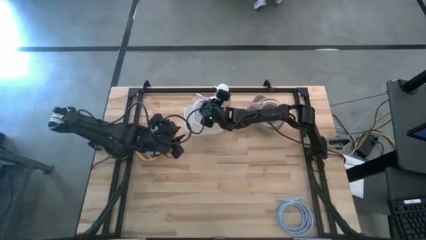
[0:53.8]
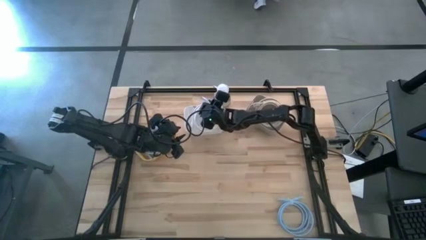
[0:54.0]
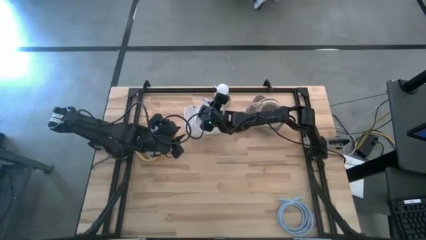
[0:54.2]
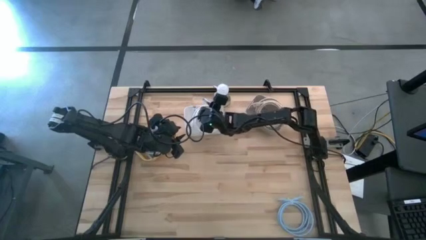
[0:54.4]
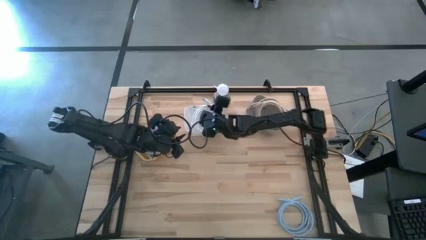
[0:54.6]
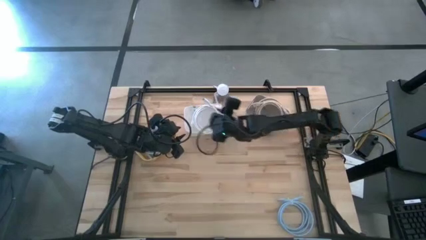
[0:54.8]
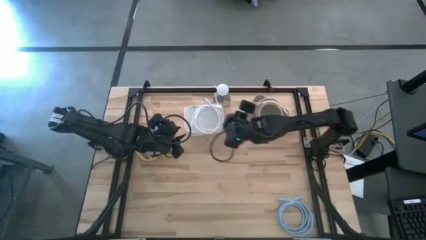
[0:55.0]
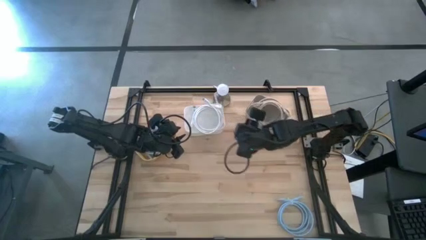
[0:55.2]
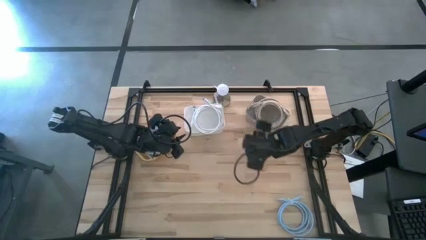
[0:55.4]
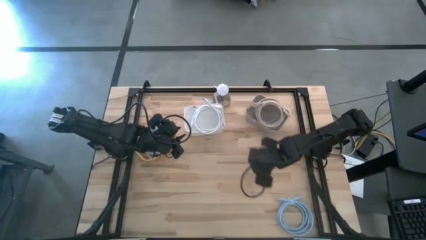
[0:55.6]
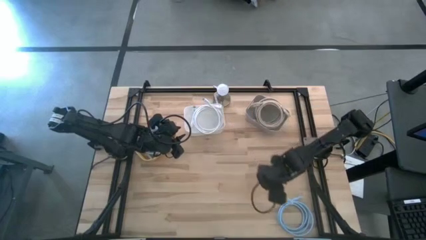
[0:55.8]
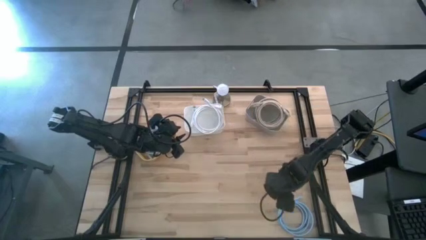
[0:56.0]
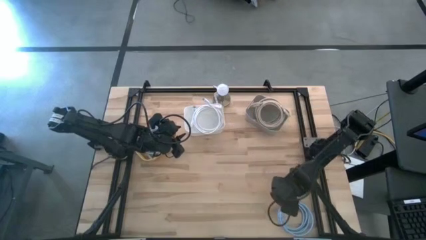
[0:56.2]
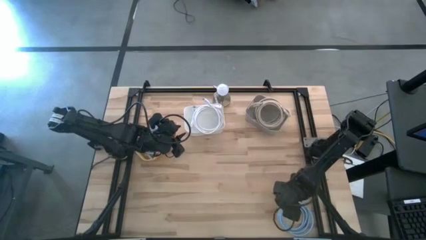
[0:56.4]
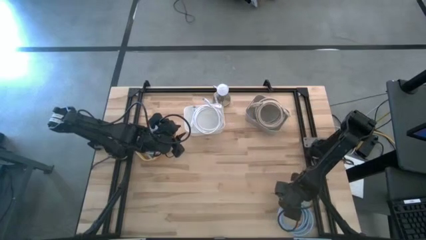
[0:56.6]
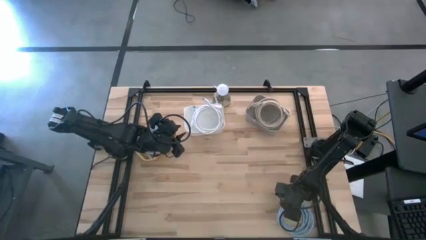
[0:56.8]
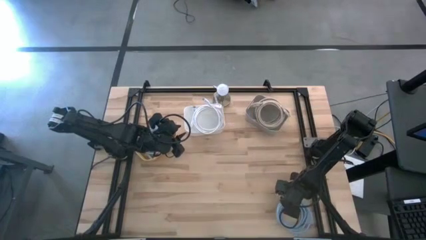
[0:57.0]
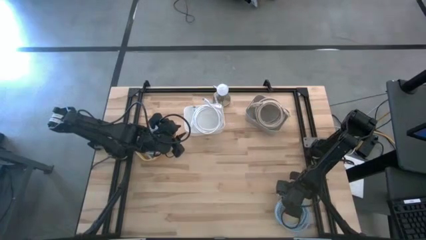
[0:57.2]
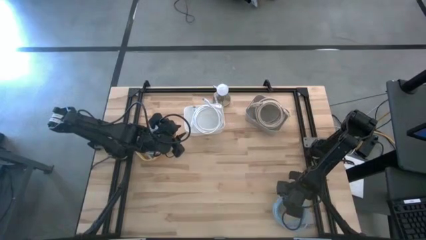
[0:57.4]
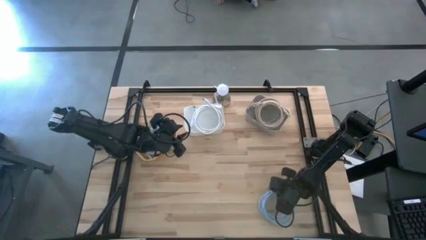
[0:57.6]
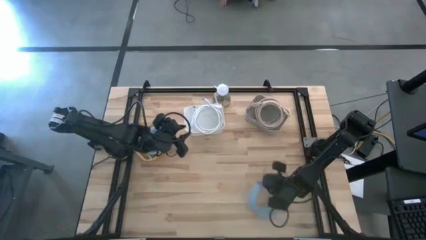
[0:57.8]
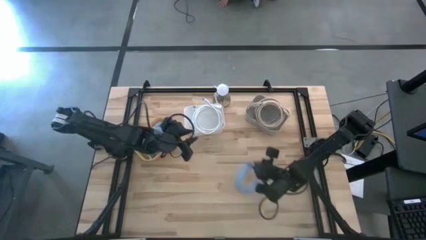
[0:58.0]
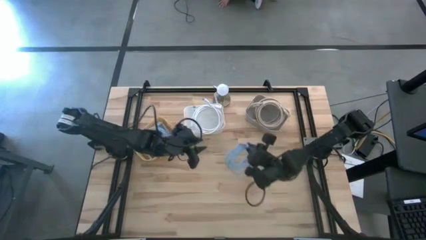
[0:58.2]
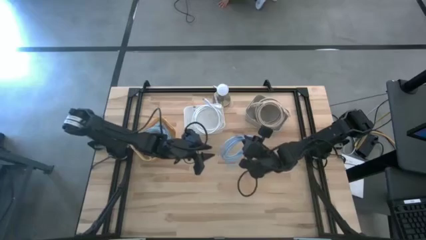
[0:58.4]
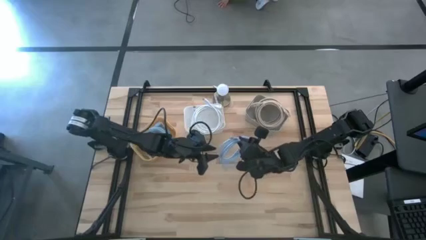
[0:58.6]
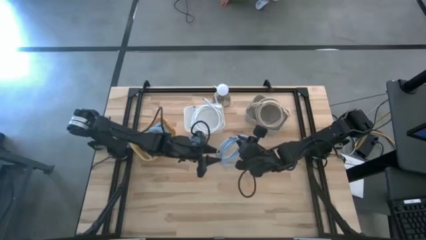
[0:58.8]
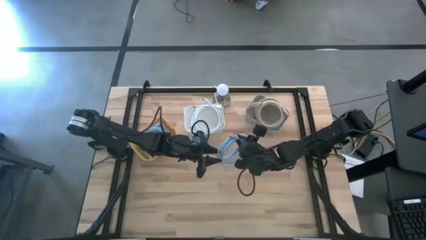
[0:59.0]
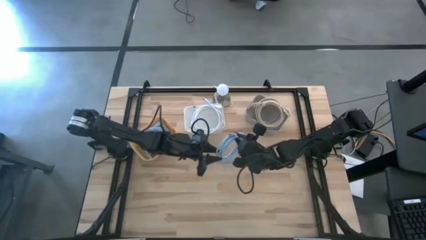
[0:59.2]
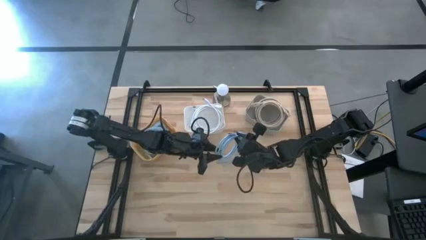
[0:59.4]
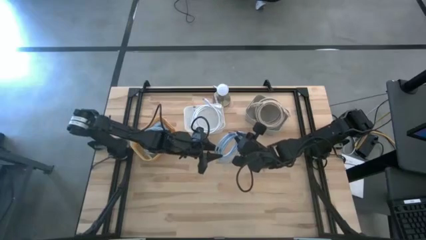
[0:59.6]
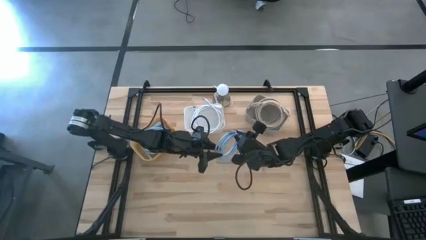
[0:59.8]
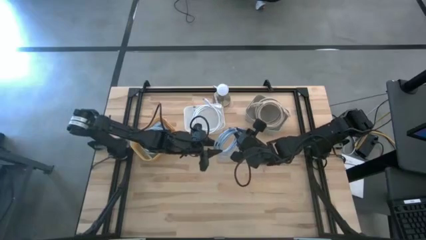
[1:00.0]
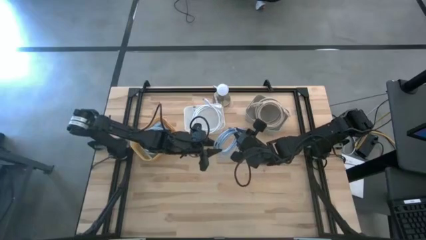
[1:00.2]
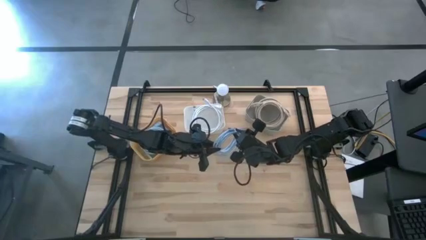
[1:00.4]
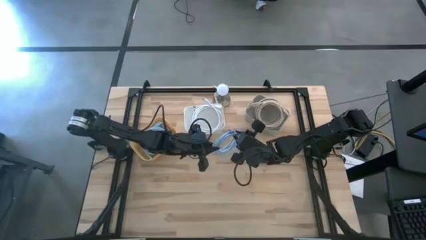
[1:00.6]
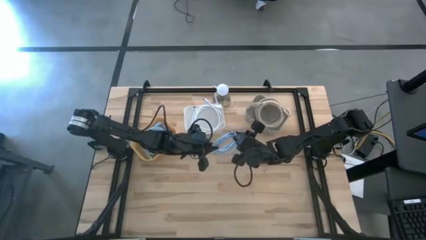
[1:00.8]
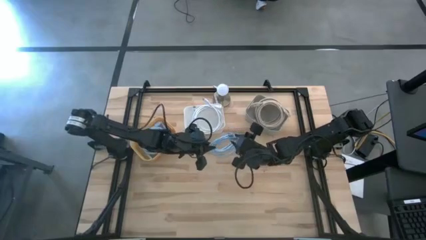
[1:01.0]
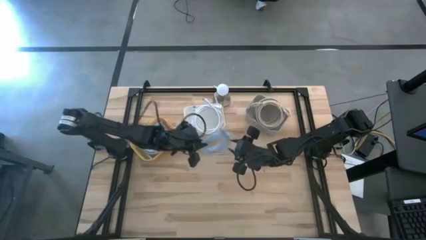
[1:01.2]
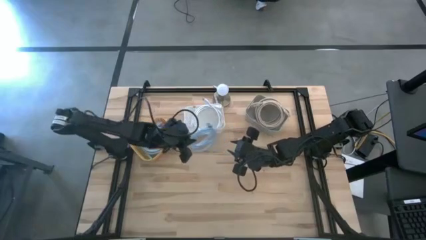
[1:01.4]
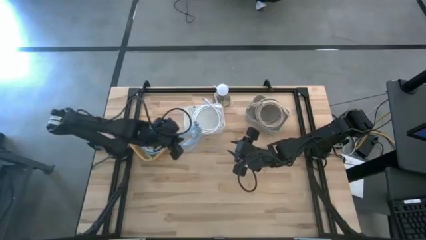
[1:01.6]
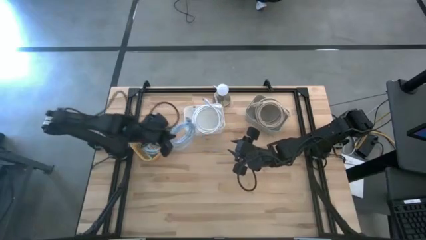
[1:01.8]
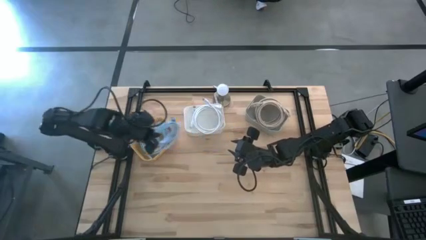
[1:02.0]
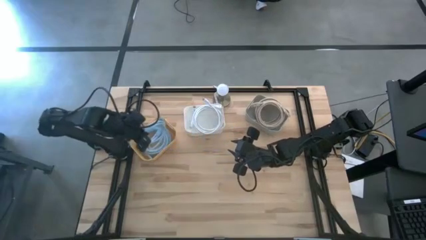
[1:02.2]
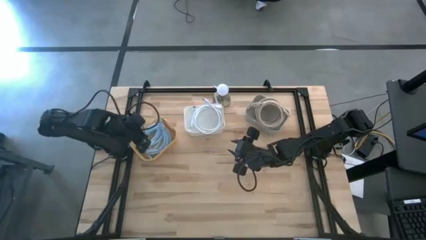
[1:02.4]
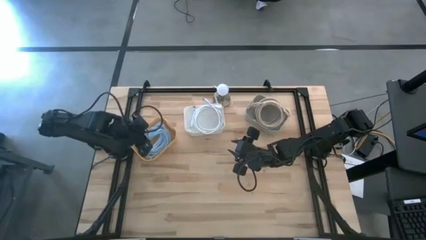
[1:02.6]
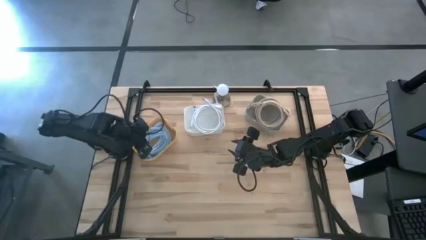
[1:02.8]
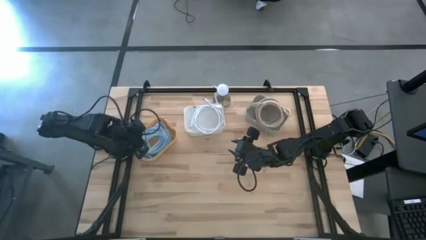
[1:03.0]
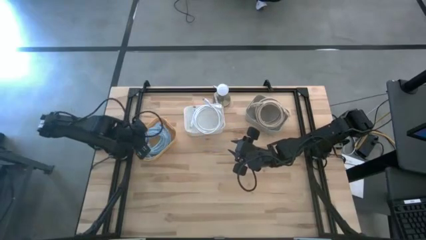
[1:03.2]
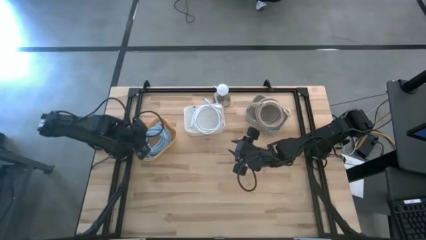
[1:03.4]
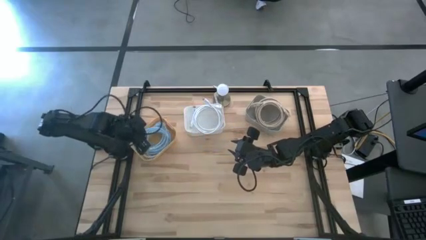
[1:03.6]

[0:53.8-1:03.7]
Task: Sort HDMI cables
Put the blue hdmi cable into the yellow bin

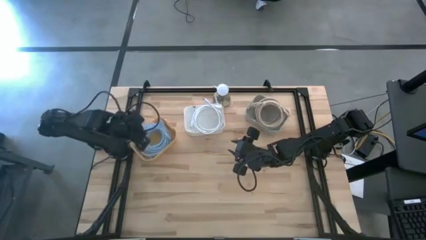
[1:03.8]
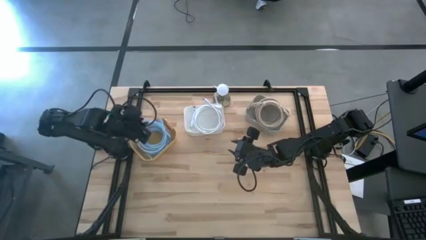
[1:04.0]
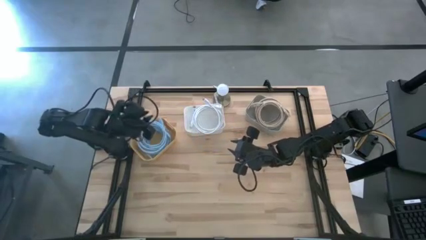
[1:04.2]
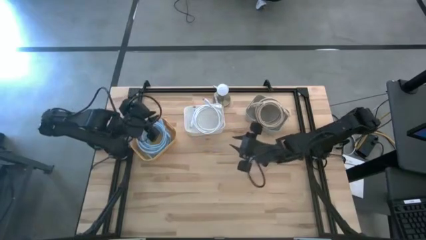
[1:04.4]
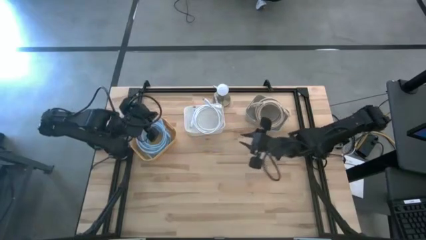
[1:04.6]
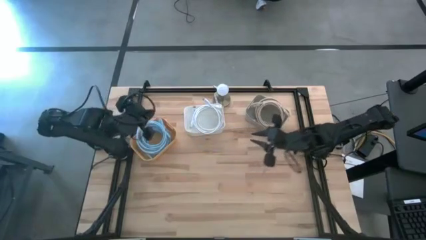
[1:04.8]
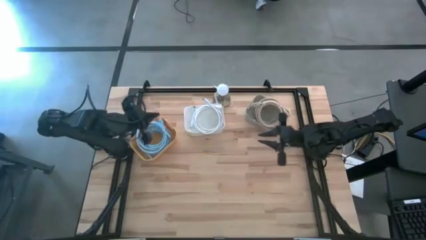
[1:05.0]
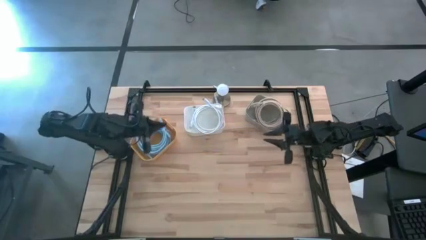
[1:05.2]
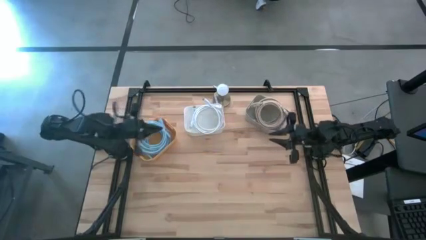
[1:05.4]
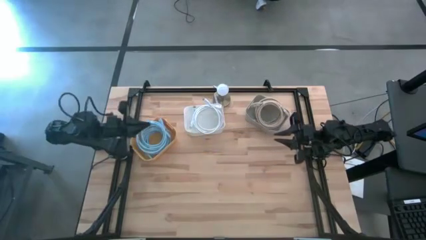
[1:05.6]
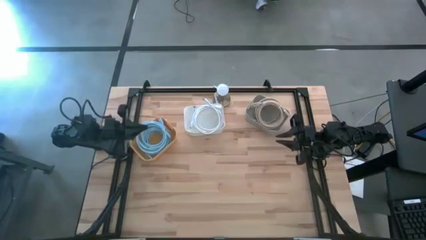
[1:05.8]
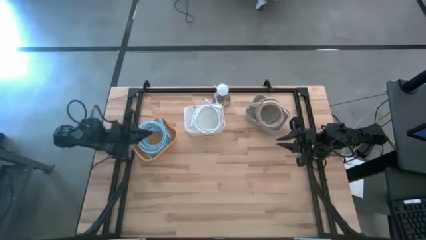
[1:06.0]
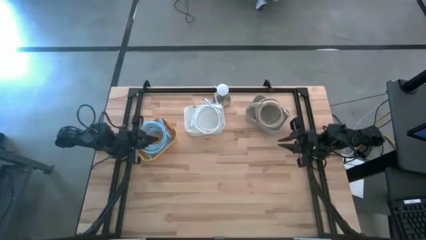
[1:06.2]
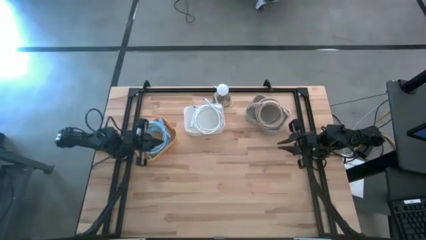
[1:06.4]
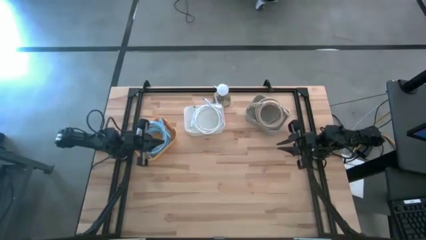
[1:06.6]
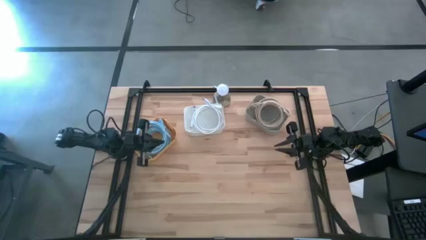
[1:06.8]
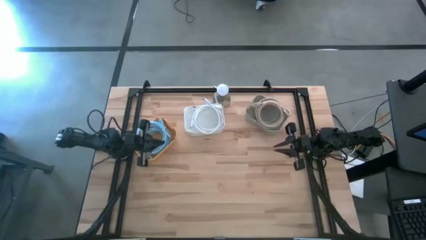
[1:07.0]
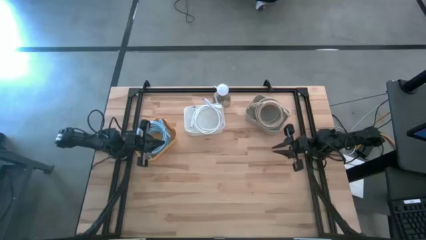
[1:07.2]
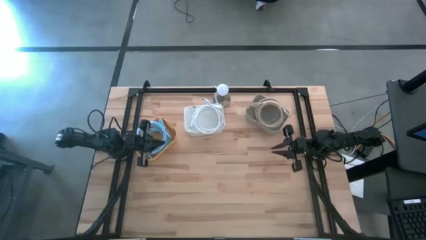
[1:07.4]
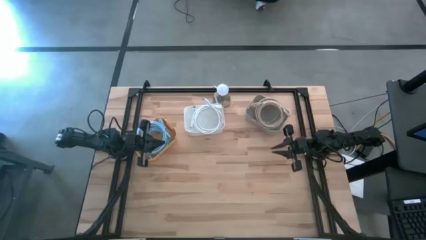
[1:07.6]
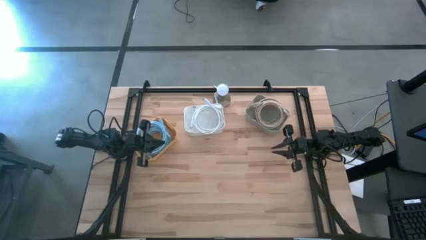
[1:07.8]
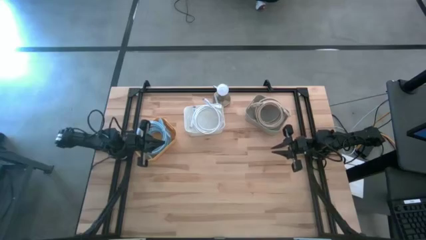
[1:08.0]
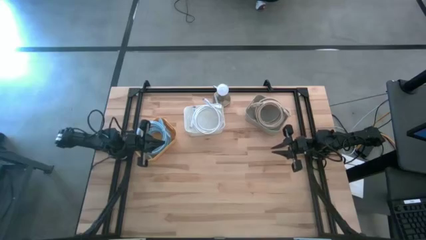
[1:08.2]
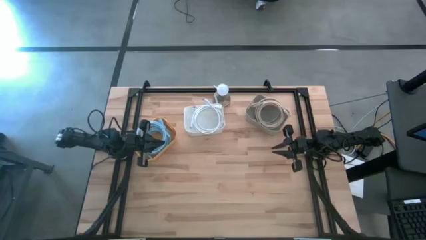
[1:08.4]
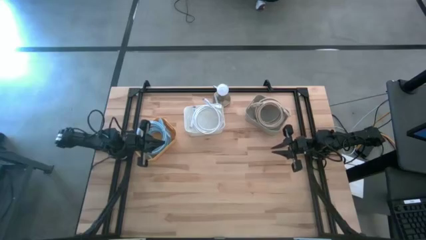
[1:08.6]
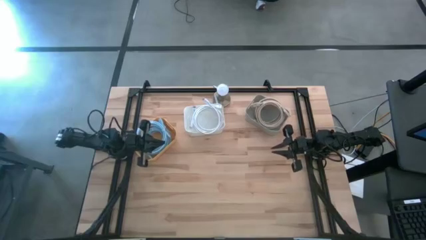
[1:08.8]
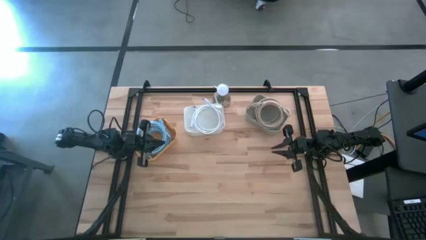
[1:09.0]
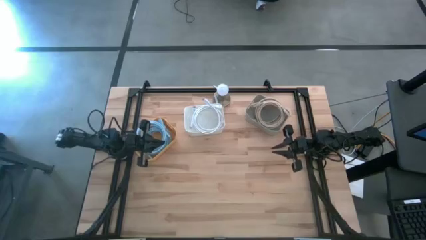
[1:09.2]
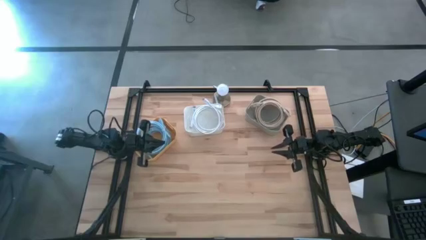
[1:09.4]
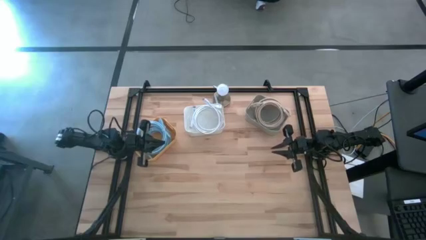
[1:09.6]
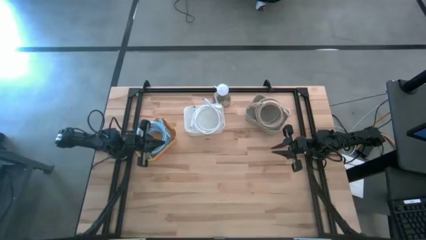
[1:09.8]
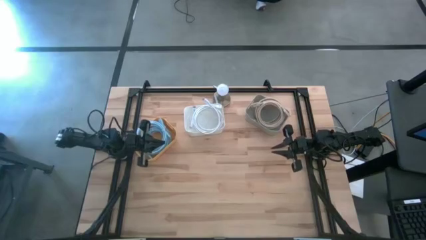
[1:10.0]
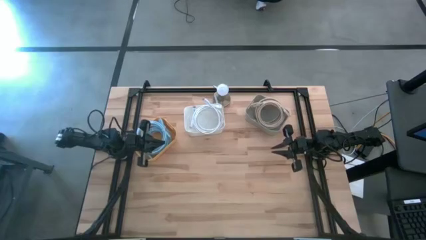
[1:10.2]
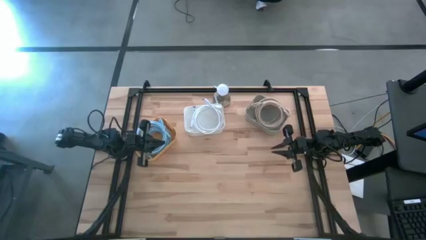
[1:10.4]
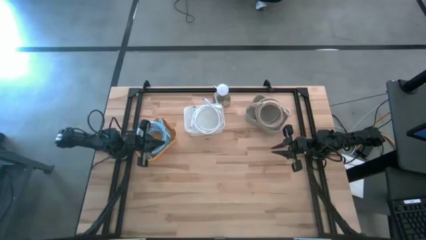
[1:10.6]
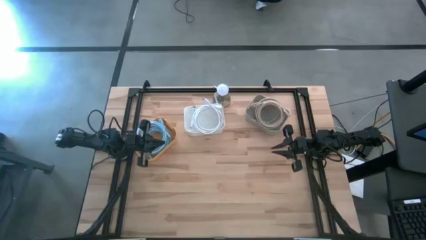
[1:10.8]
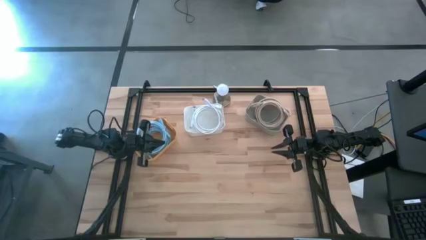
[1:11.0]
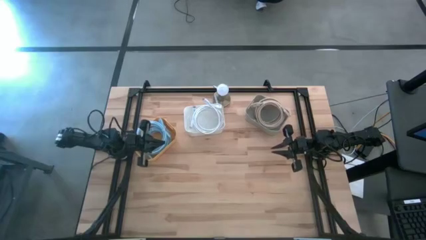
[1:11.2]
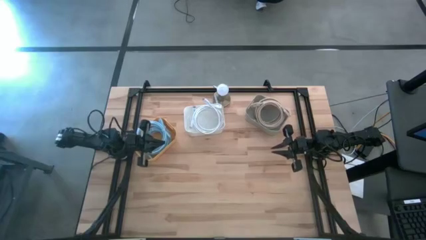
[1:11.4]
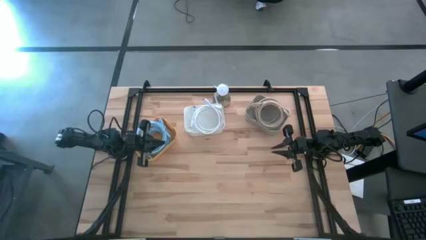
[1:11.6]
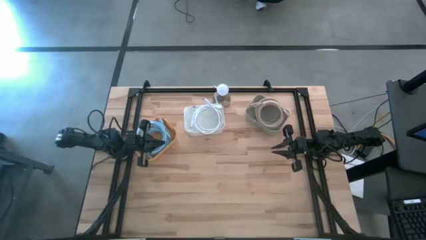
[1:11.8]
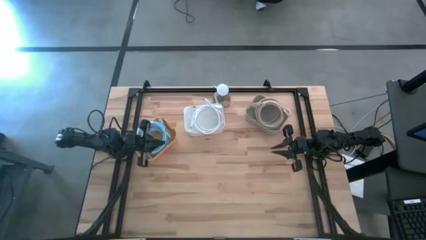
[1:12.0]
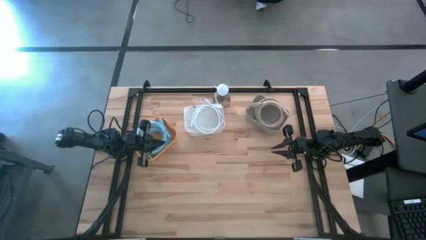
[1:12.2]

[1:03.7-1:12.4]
Return to Home Position
